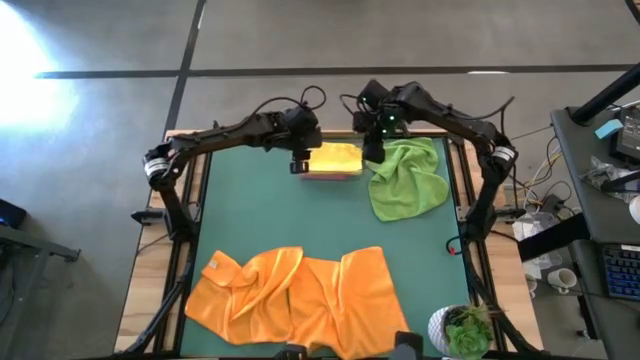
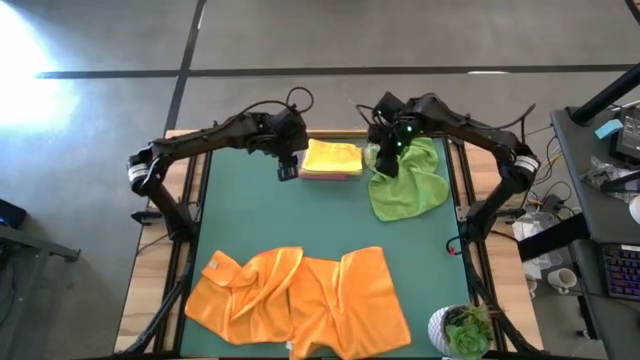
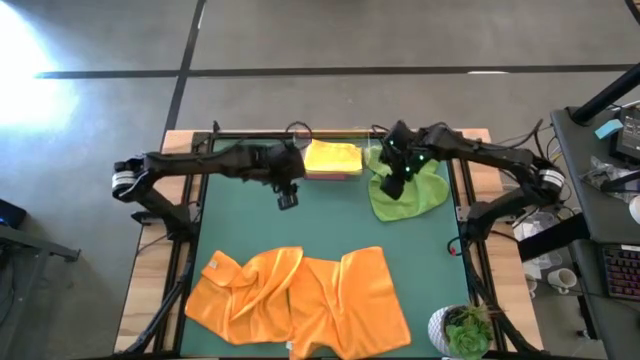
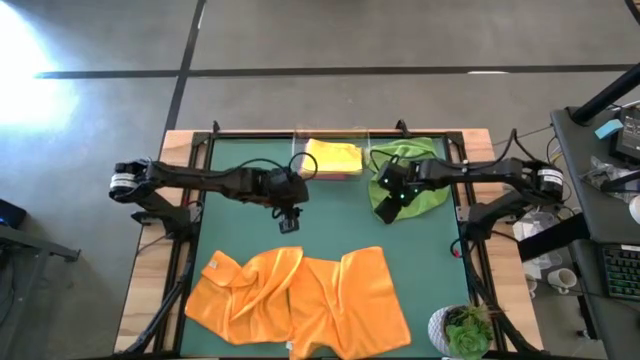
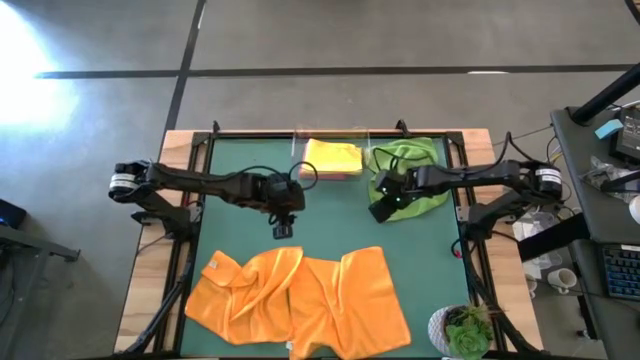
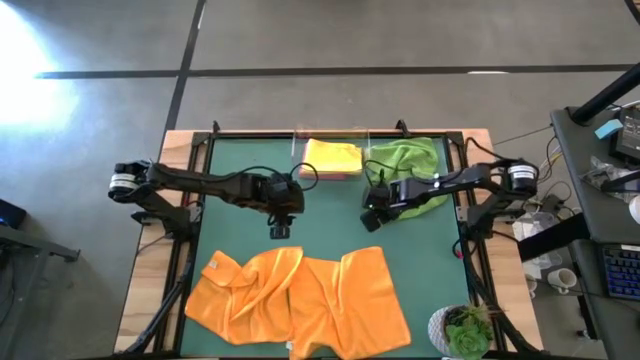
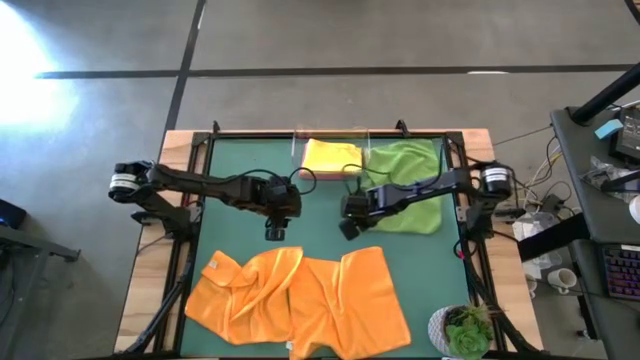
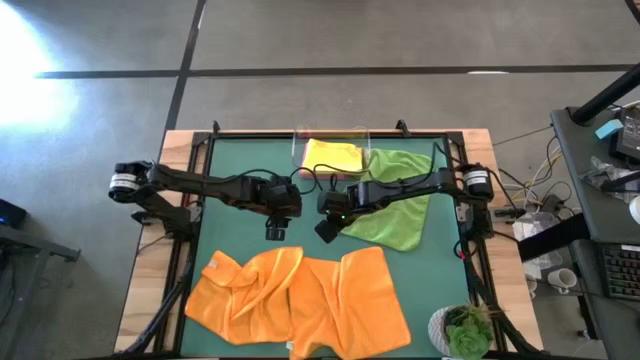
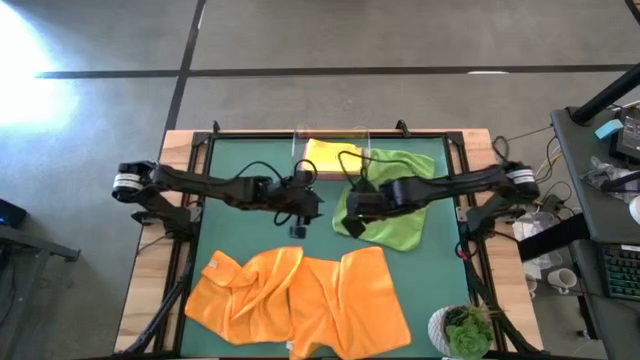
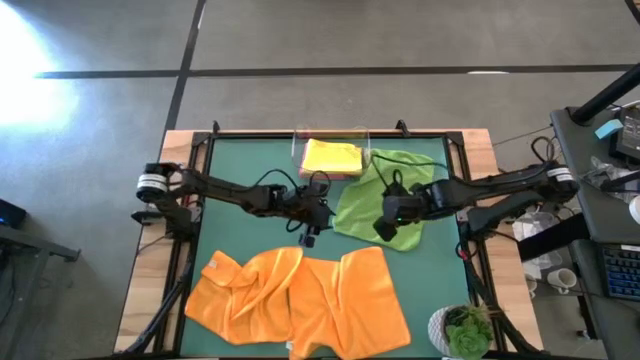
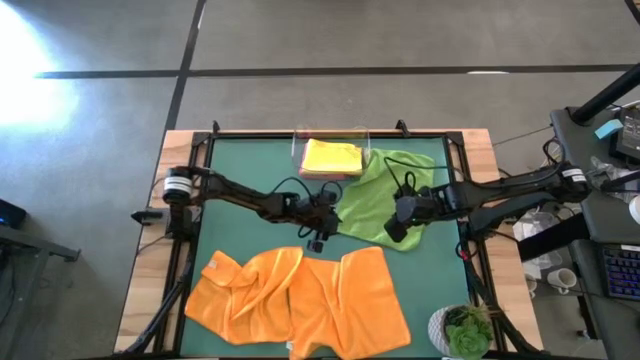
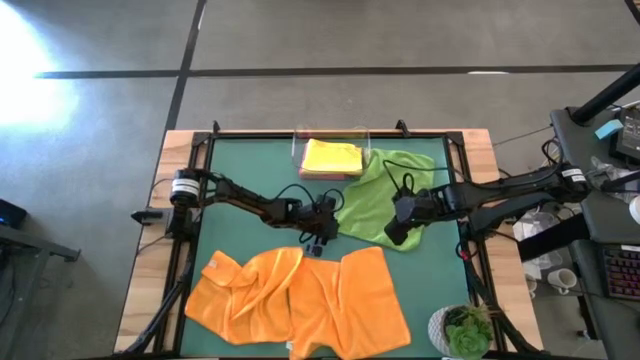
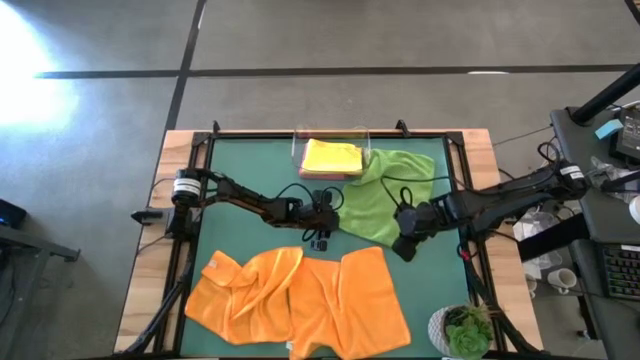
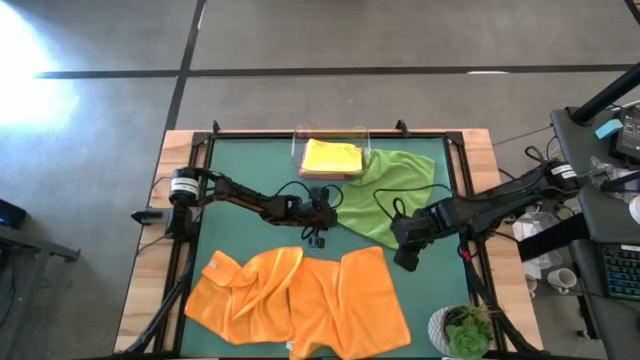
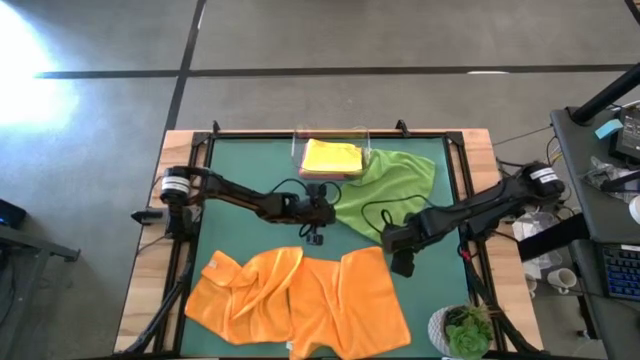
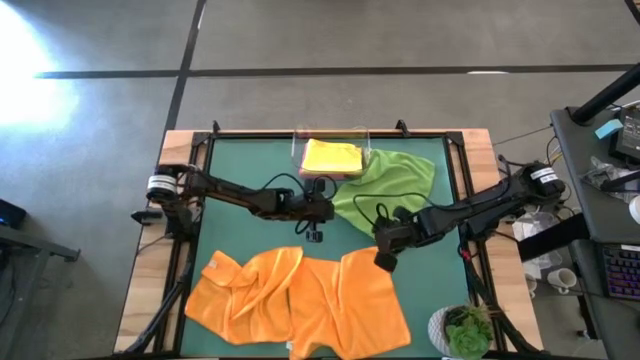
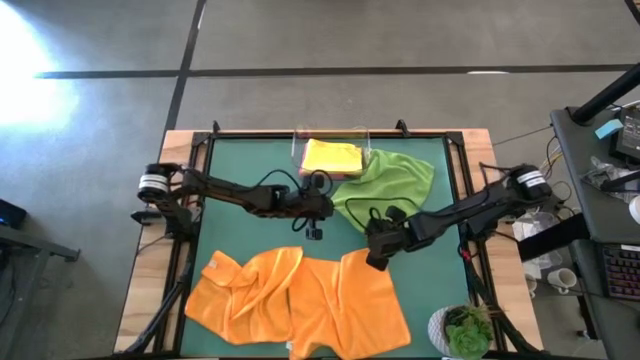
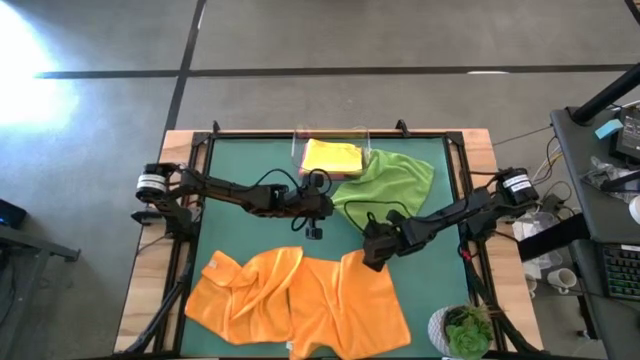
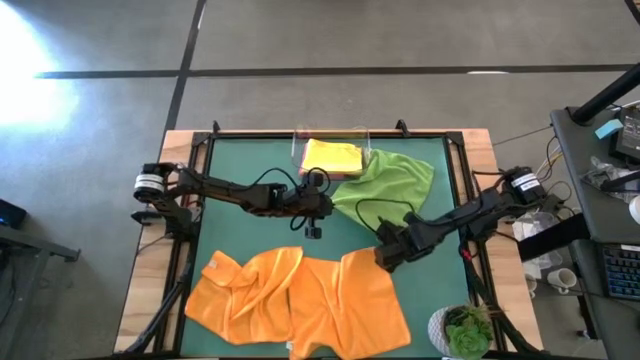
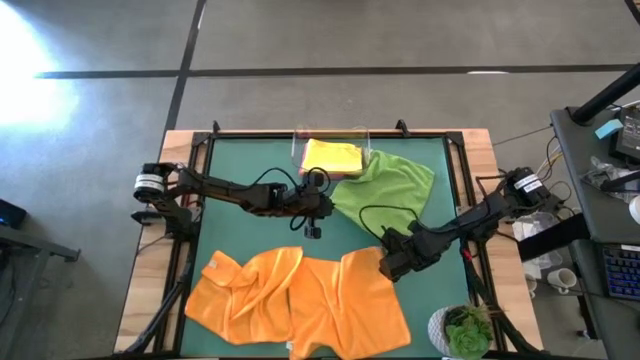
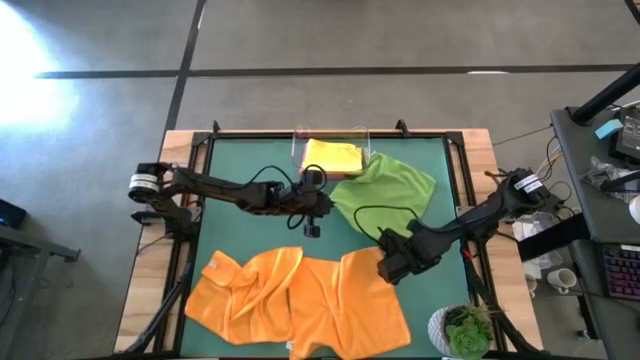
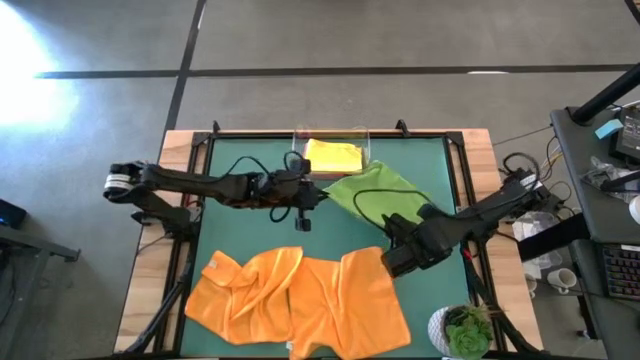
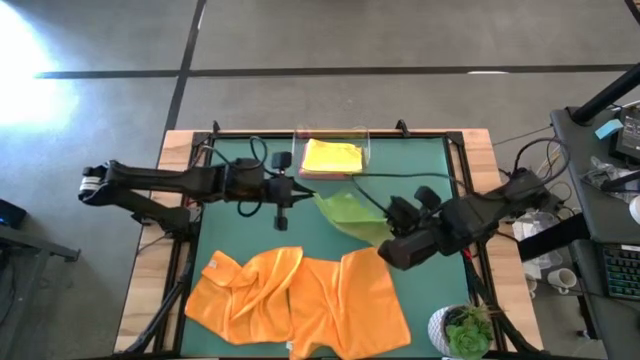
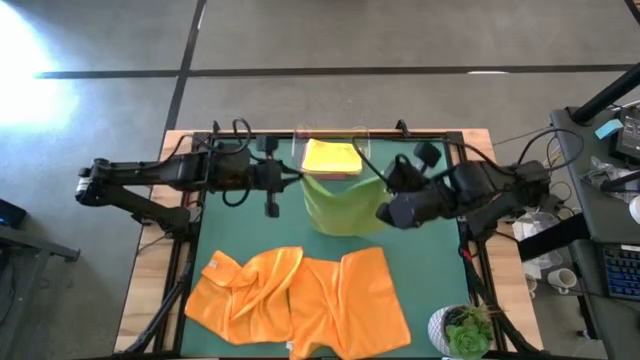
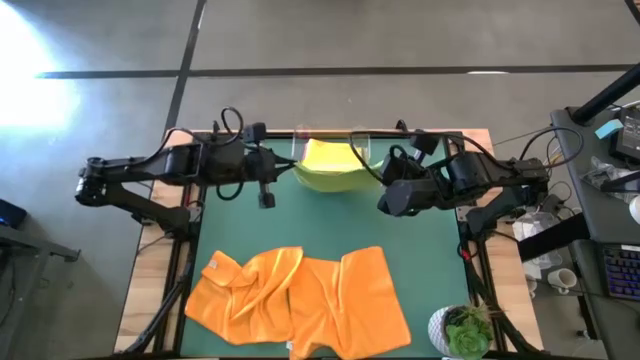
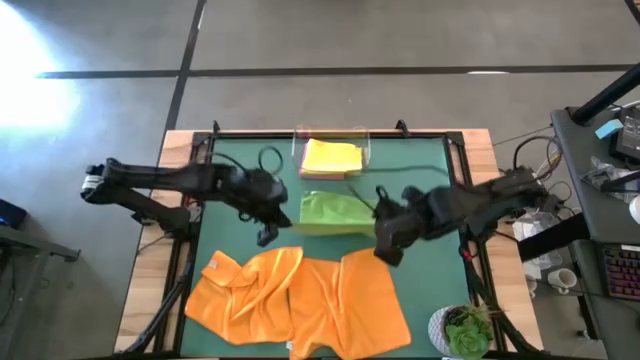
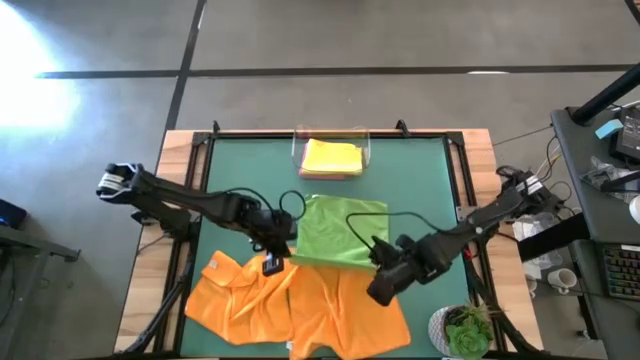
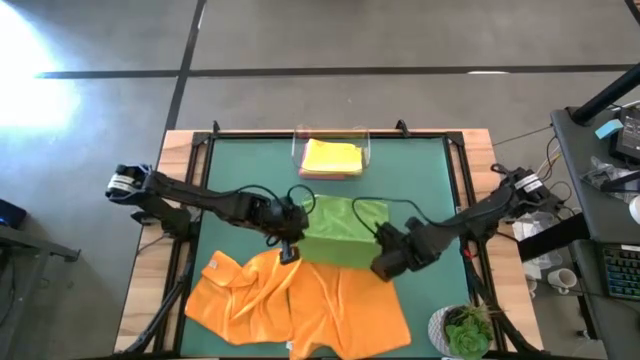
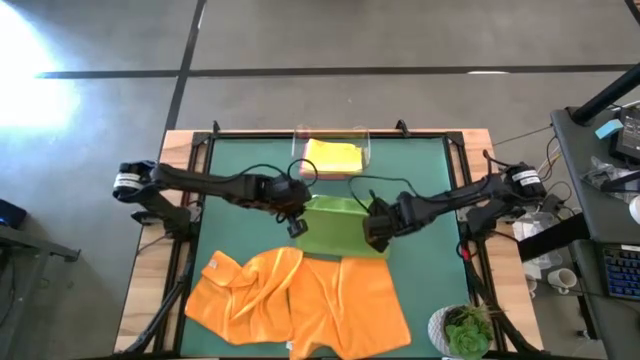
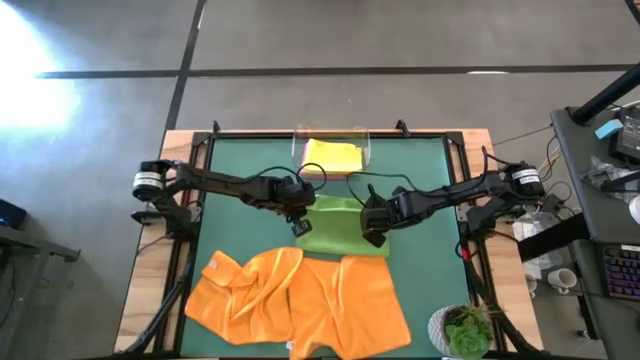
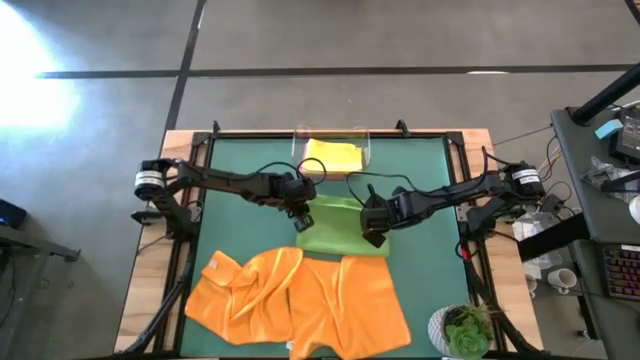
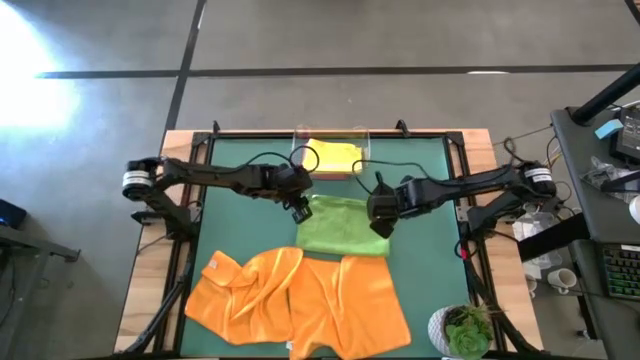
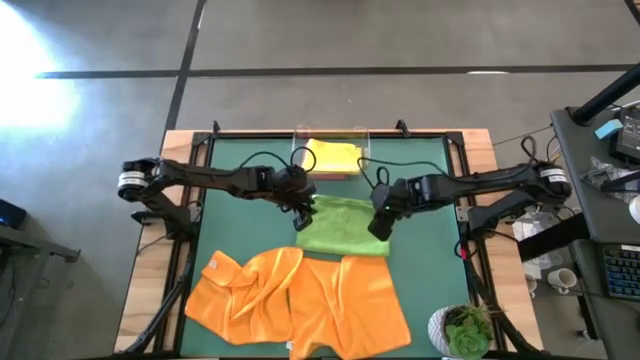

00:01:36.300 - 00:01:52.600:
Task: Fold microfiber towels
Fold the green microfiber towel

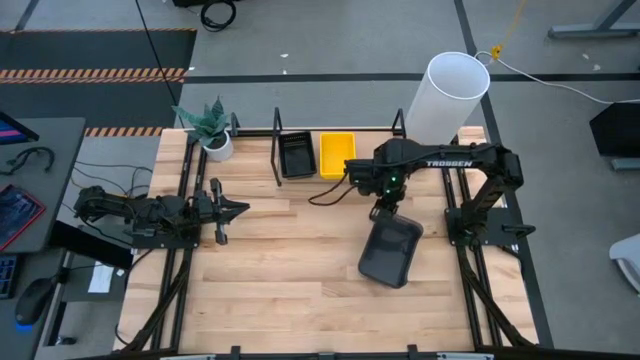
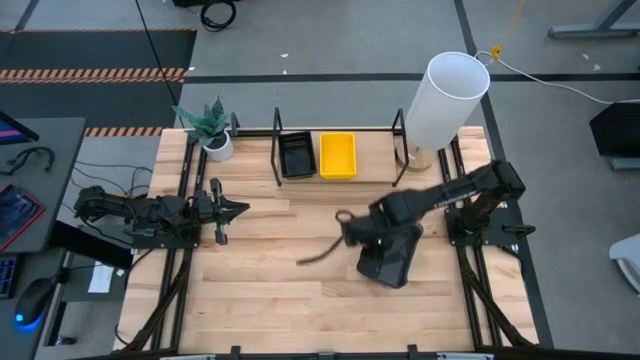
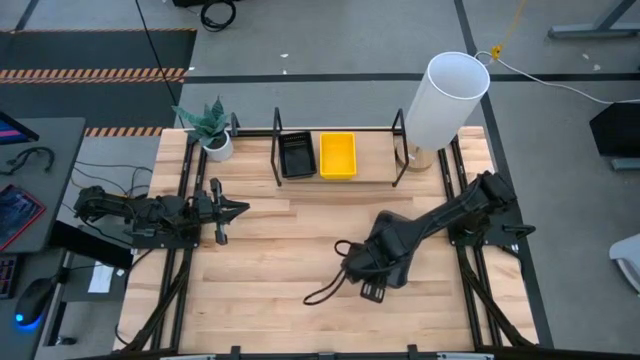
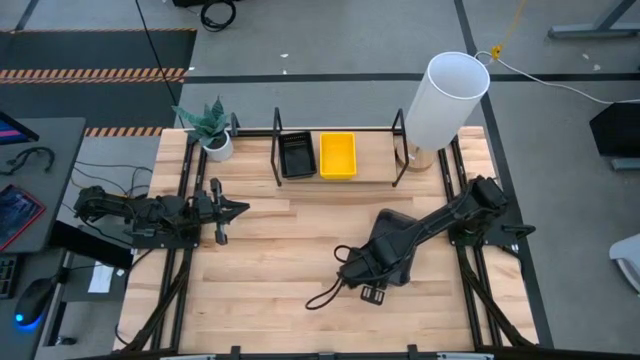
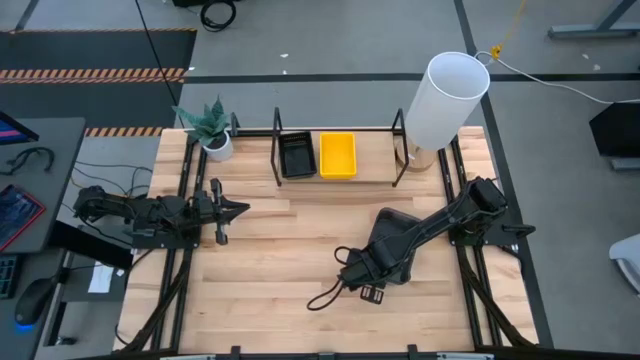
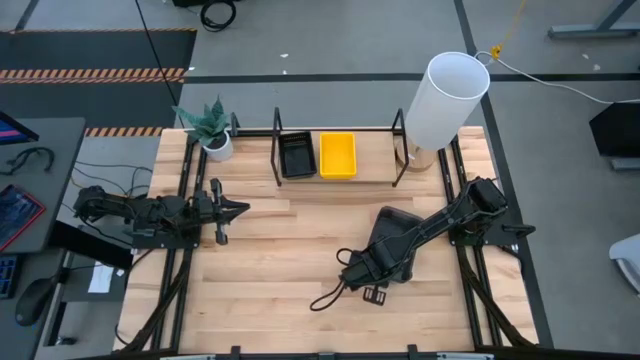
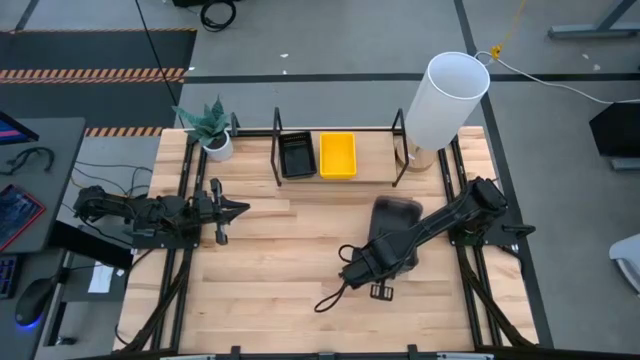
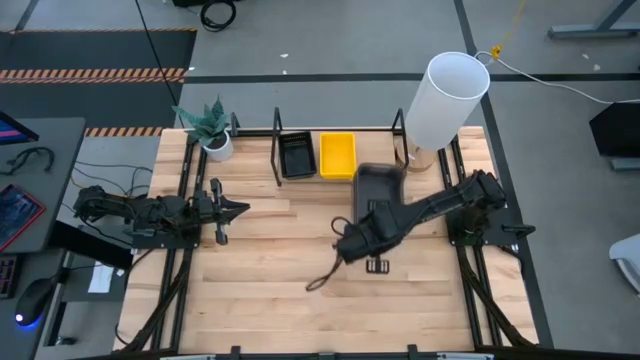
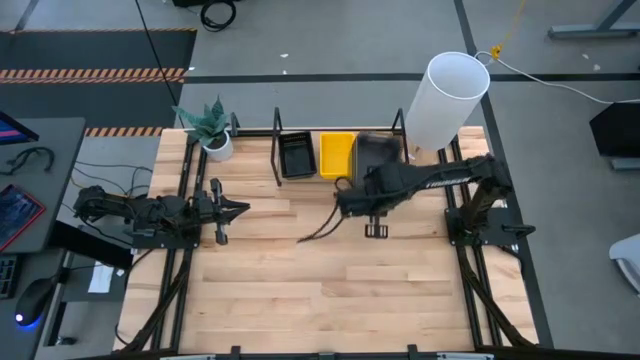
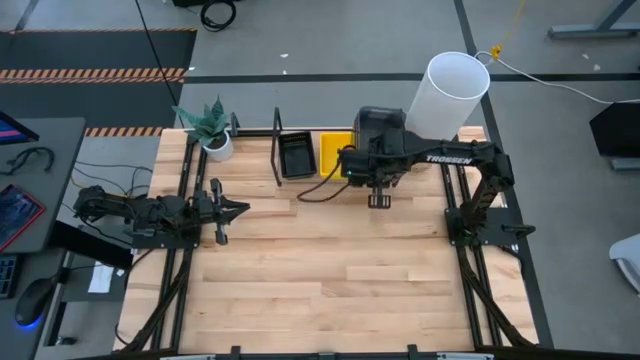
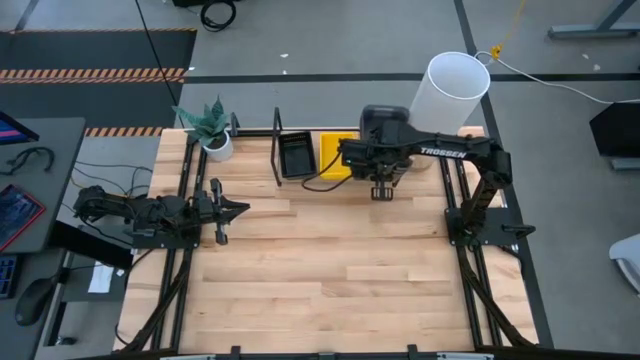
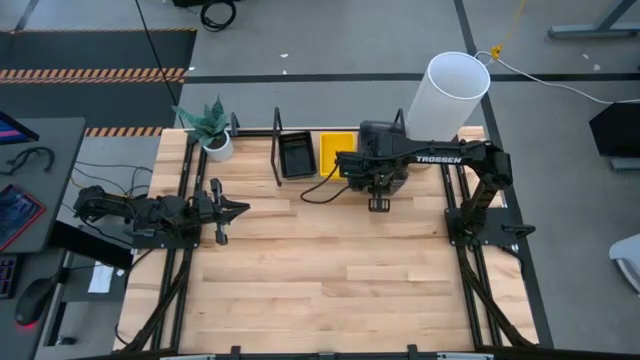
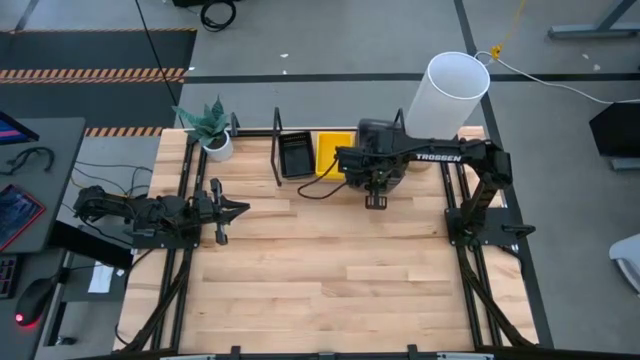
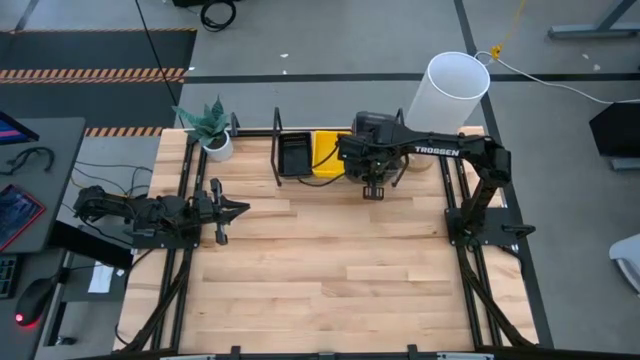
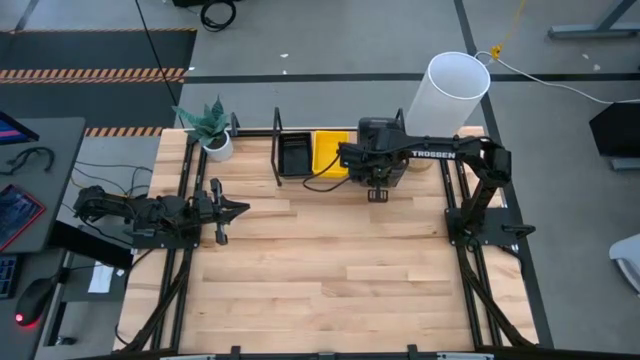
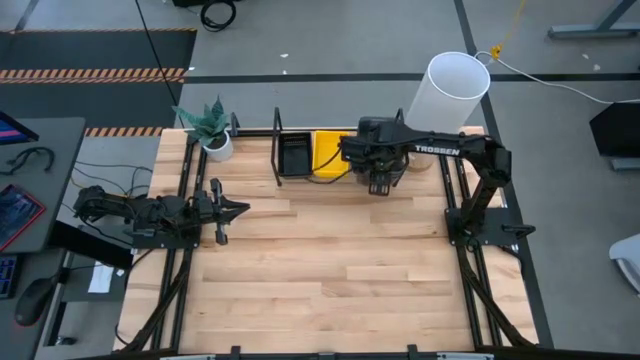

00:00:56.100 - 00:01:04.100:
Task: Stack baskets on shelf by color
Put the stacked black transparent bins on the shelf
